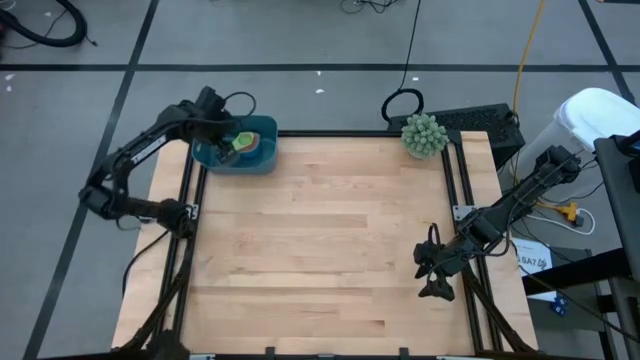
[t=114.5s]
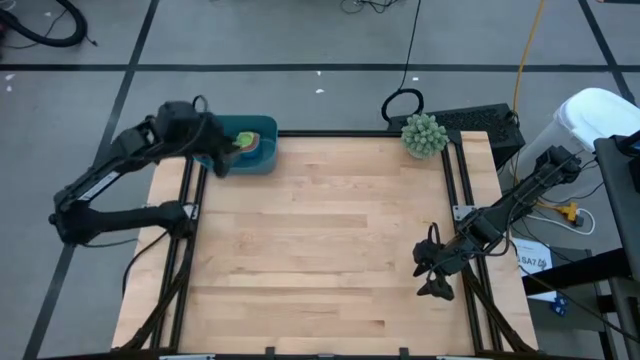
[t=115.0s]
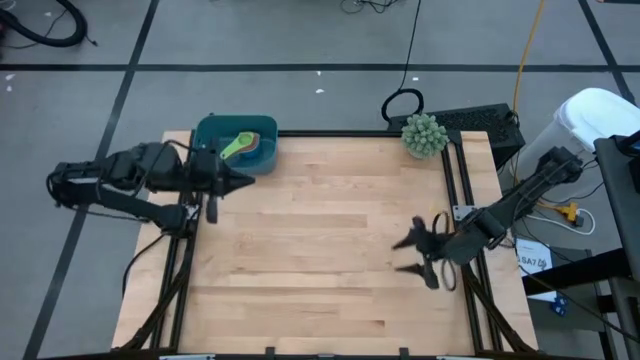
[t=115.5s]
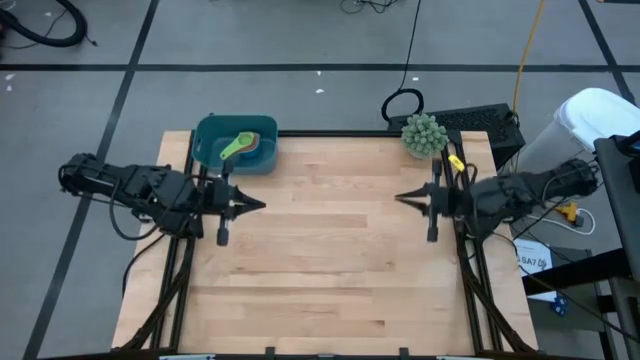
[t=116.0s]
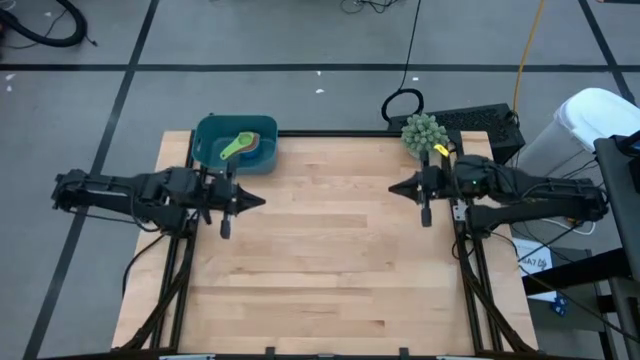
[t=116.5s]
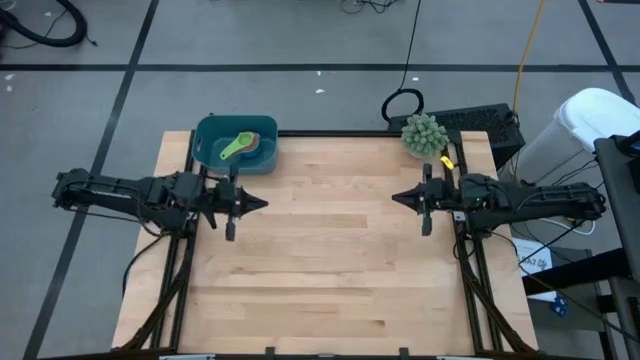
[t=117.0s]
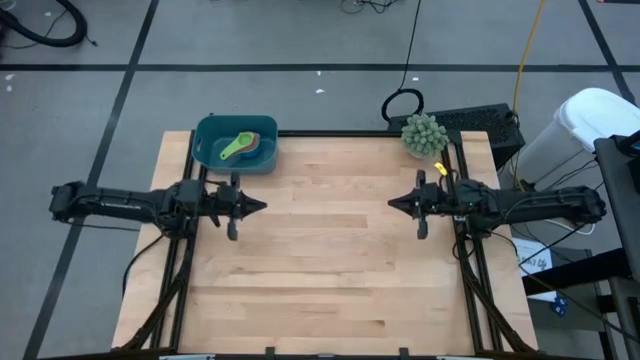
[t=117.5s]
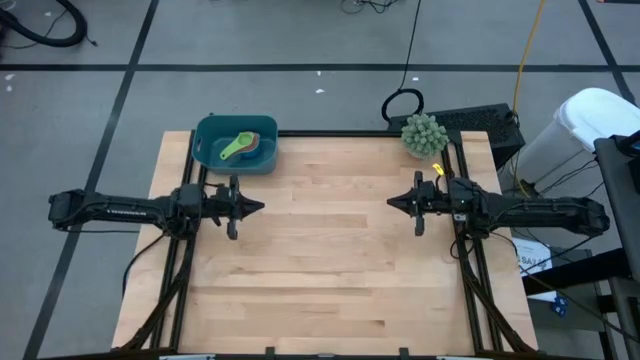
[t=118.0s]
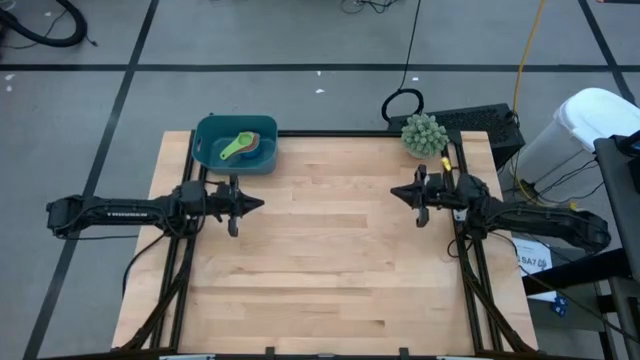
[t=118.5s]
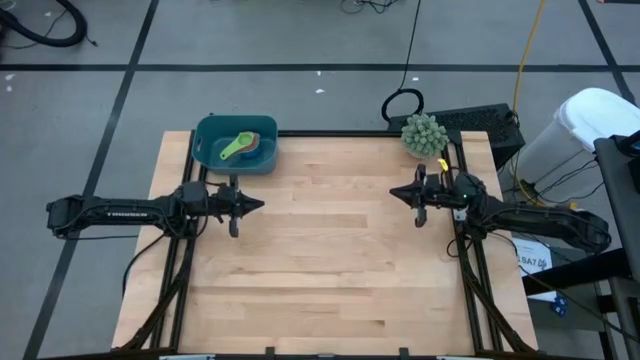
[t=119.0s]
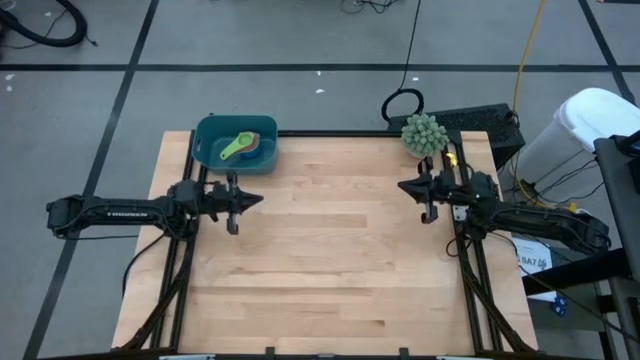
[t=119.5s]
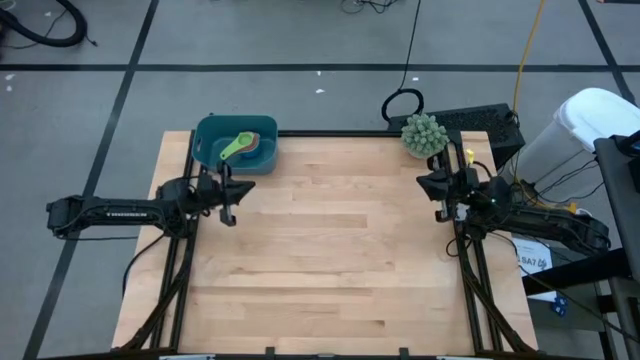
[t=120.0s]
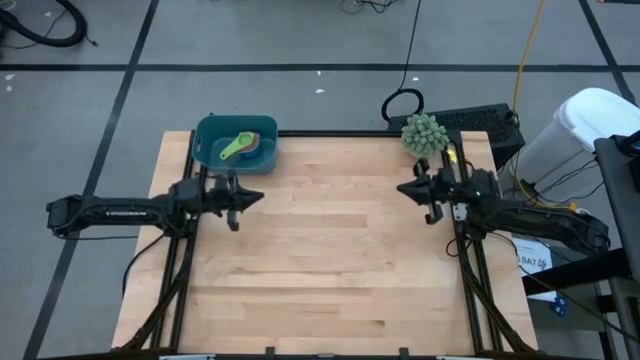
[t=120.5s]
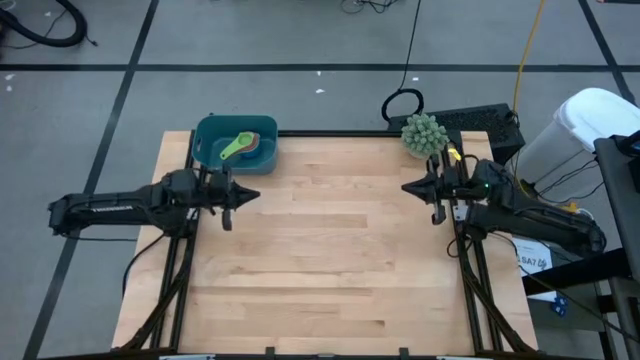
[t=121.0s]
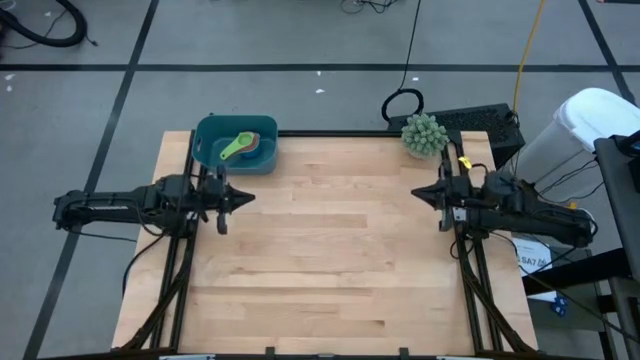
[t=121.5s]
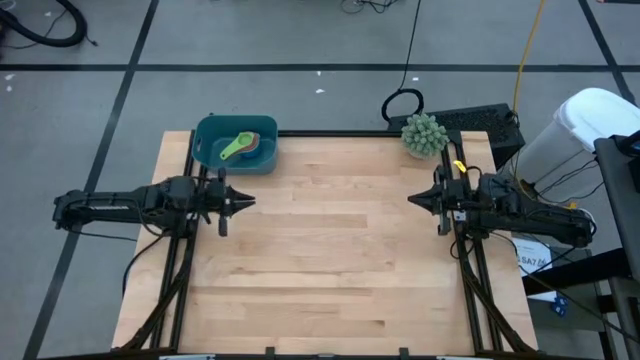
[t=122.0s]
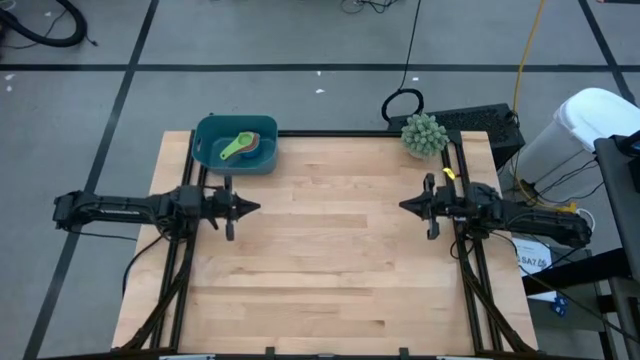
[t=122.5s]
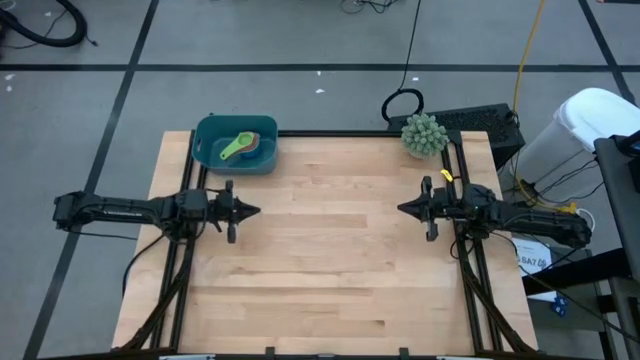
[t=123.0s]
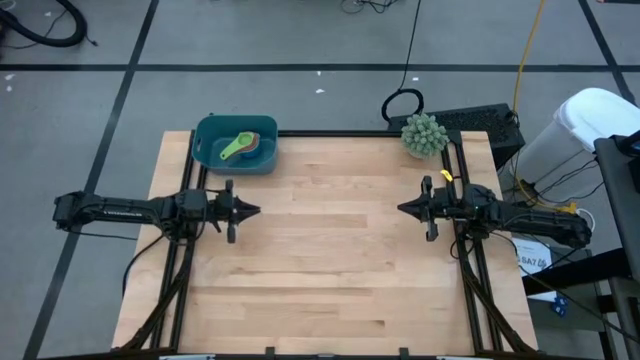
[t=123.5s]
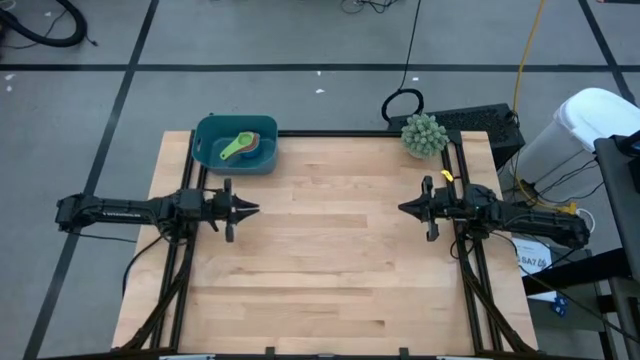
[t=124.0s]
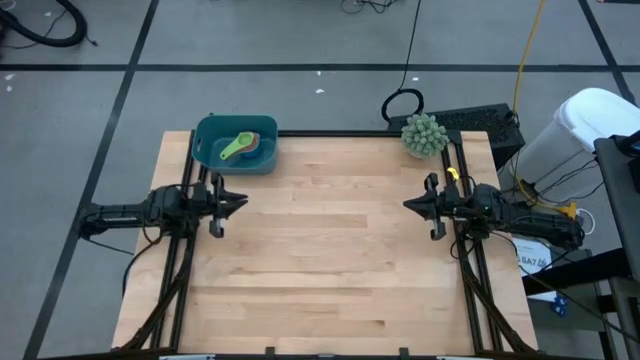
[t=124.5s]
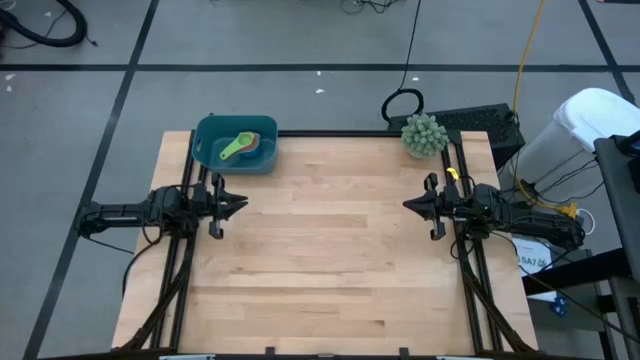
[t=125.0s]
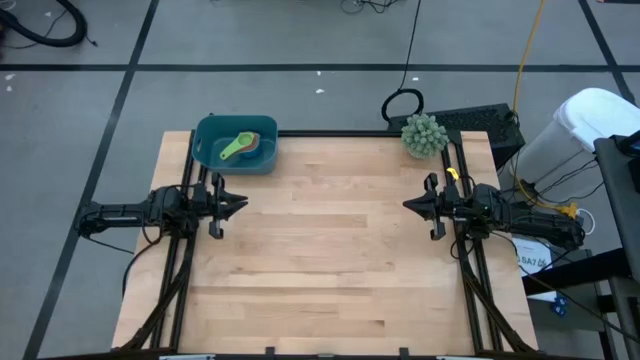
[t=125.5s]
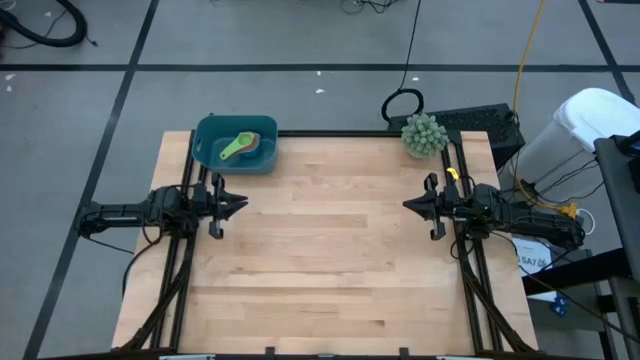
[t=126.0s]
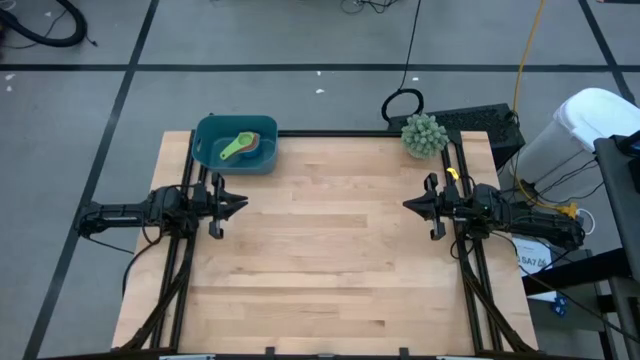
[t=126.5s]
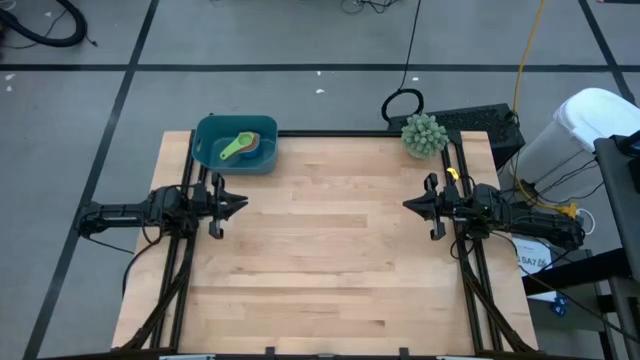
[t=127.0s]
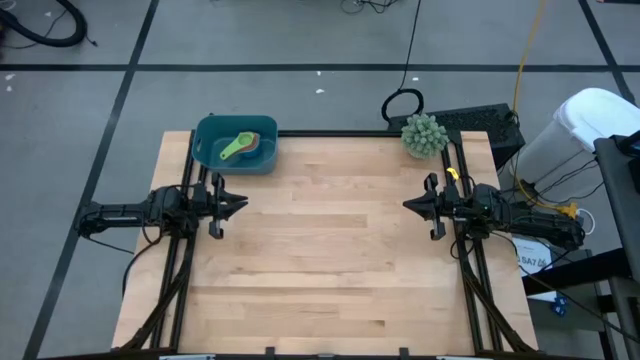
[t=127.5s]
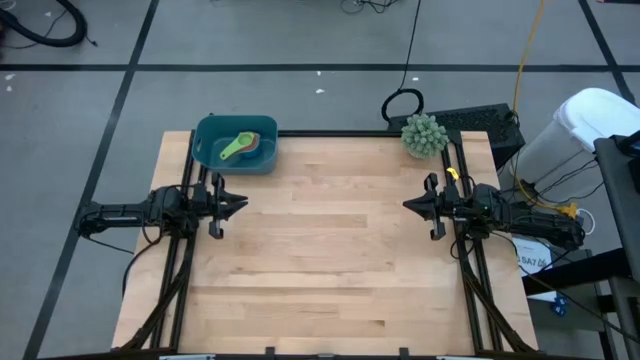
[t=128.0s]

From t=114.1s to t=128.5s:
Task: Nest measuring cups in basket
Return to Home position

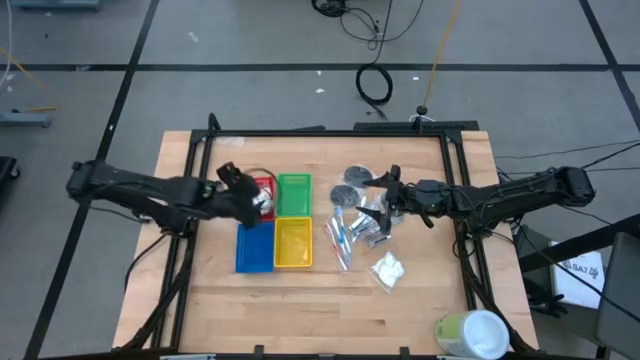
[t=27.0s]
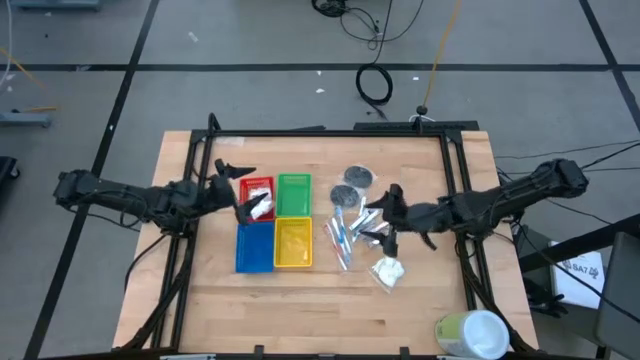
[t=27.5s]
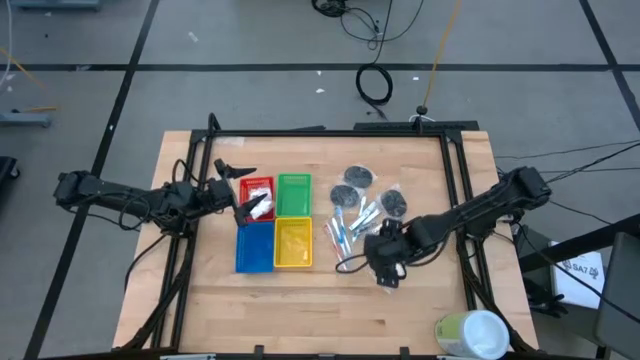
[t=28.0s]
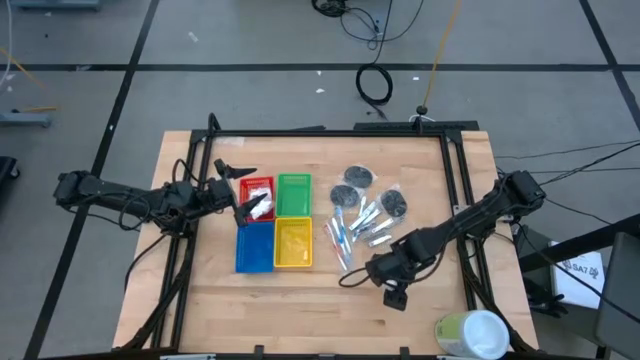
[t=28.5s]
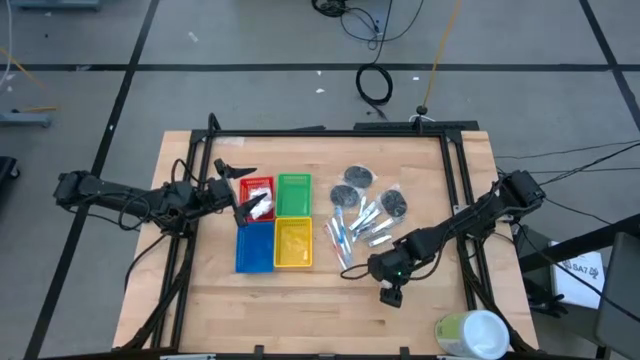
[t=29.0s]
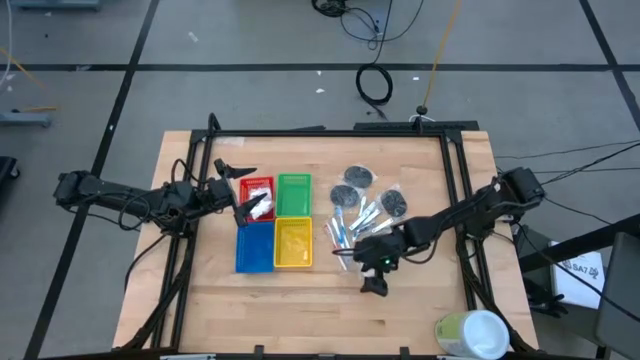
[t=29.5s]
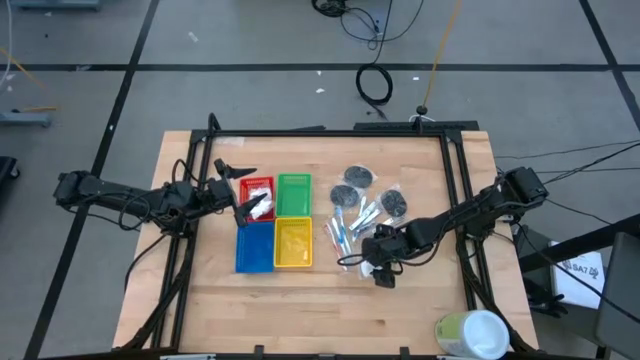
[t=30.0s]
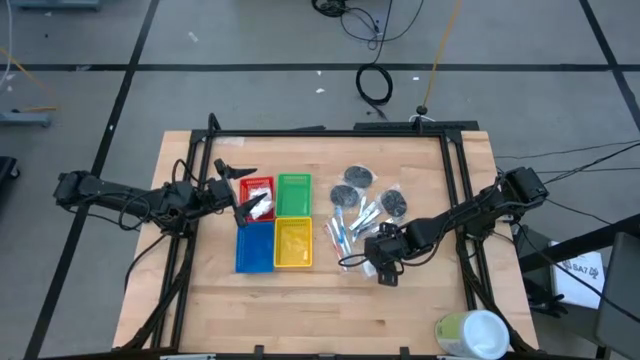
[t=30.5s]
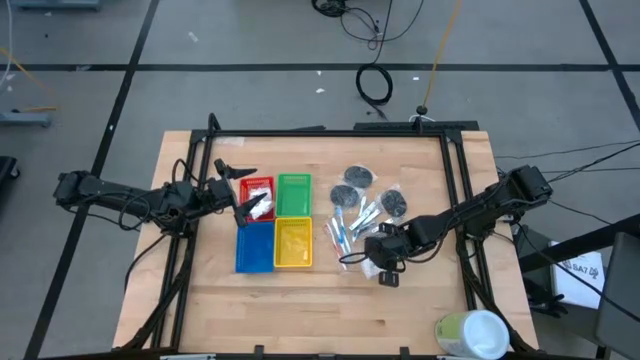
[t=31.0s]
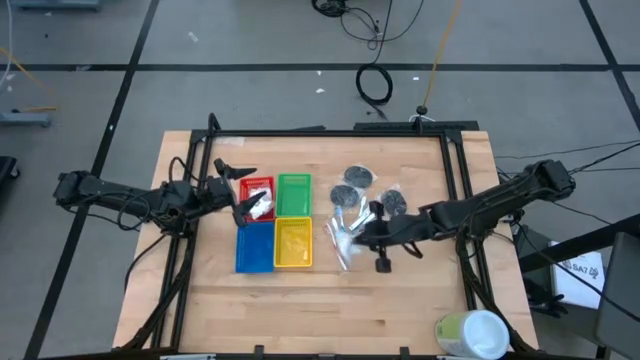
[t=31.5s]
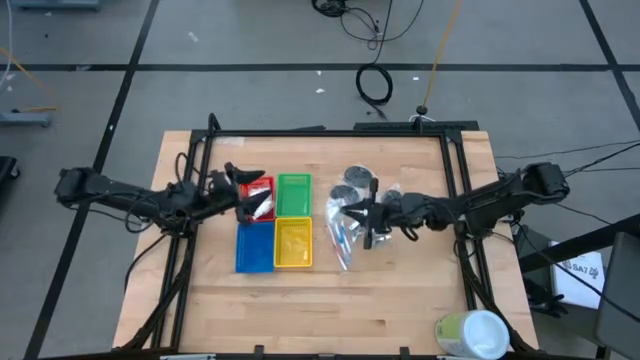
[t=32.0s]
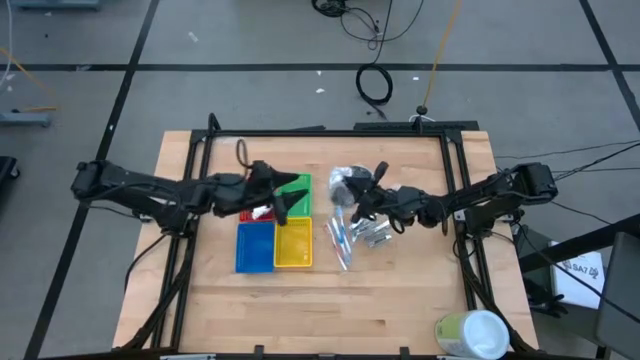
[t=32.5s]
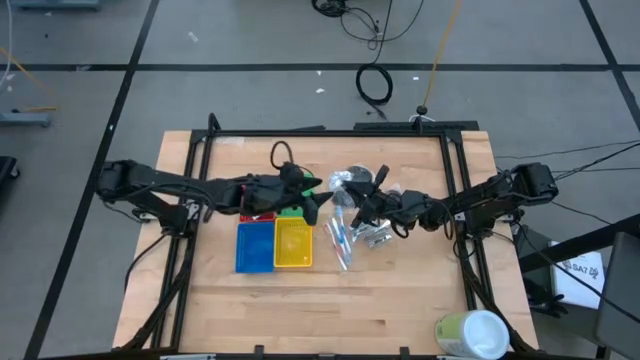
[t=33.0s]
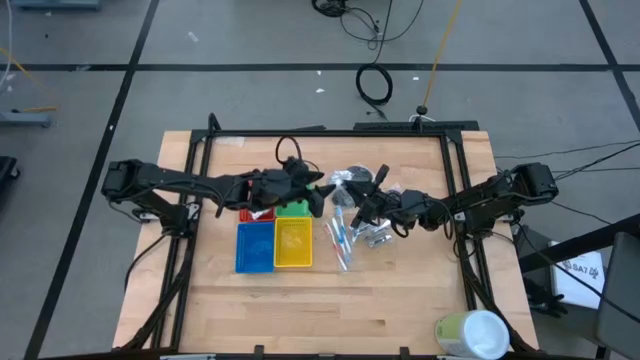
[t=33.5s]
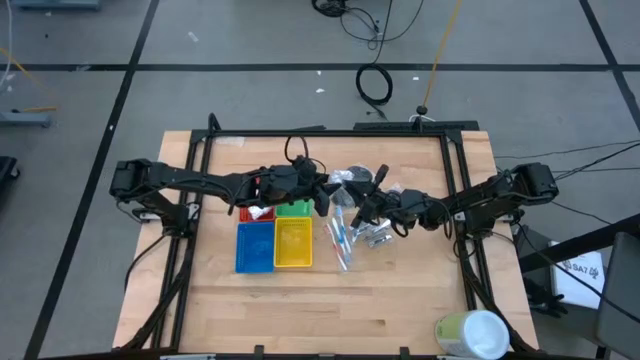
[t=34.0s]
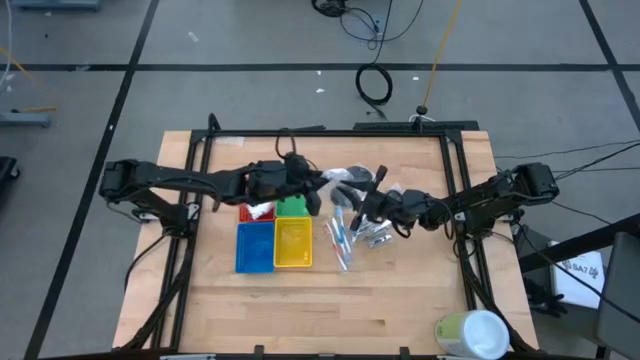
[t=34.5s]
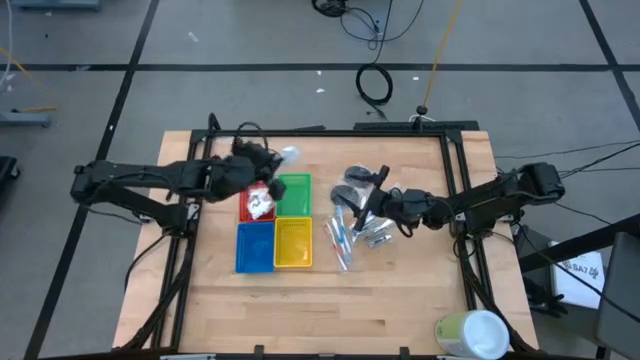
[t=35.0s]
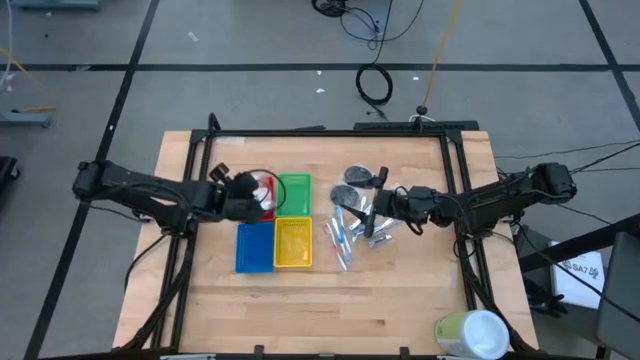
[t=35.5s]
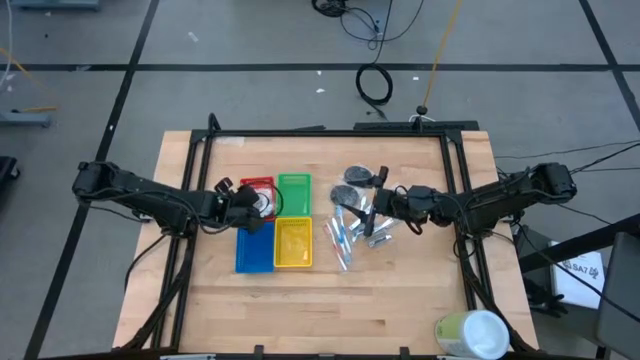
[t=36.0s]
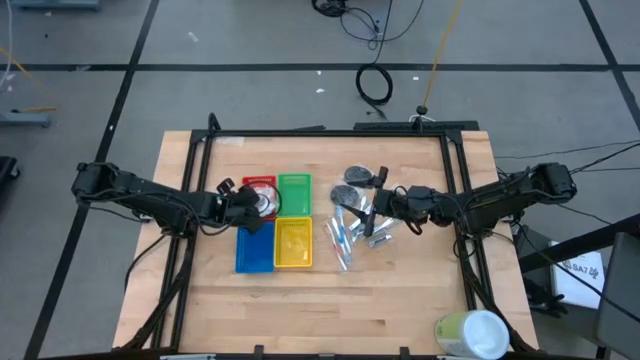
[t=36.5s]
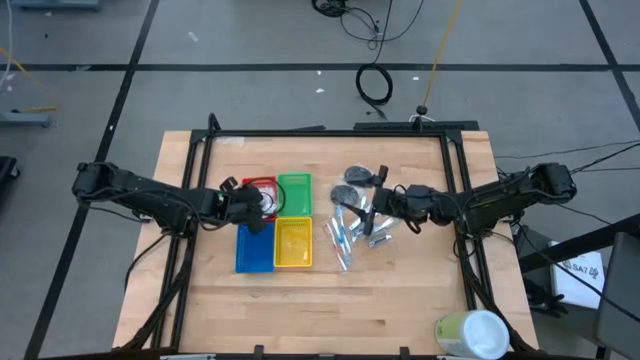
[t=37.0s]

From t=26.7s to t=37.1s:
Task: Pick & Place Travel size toiletries
Put the white cotton pack into the red bin
